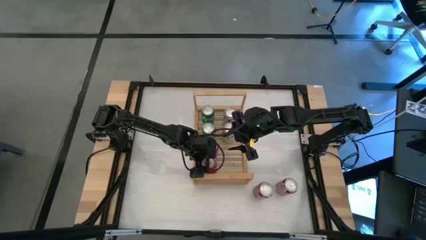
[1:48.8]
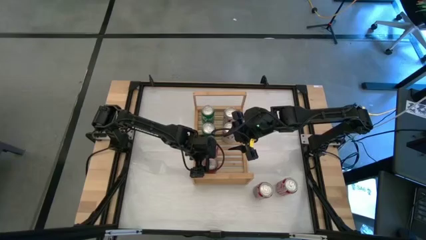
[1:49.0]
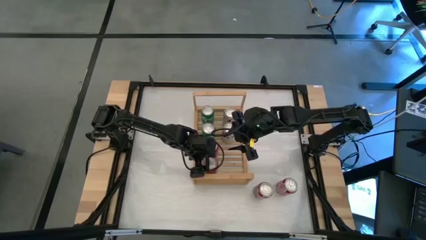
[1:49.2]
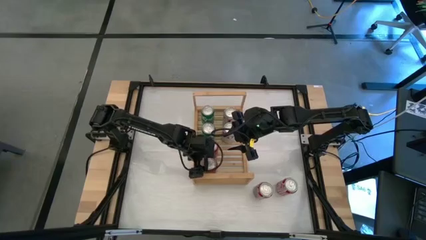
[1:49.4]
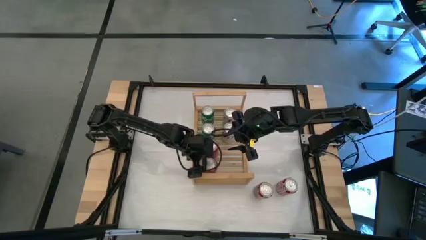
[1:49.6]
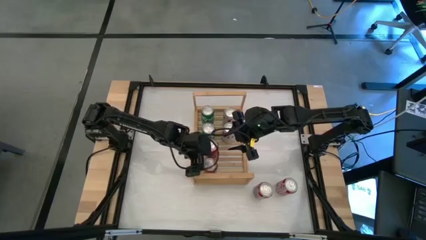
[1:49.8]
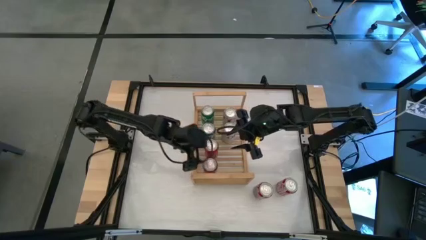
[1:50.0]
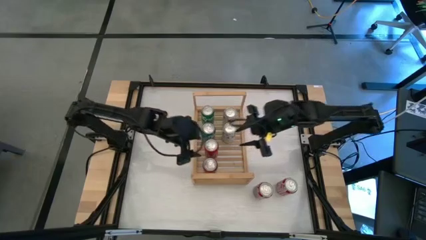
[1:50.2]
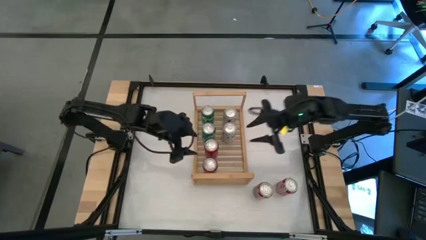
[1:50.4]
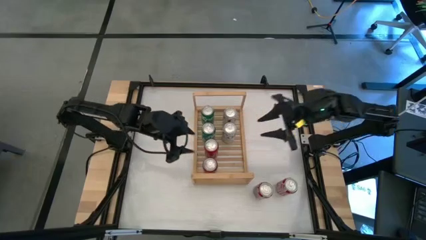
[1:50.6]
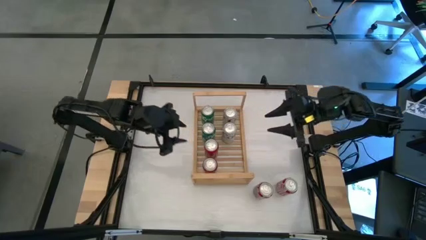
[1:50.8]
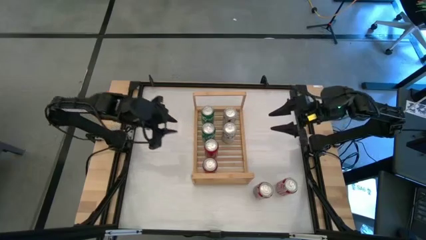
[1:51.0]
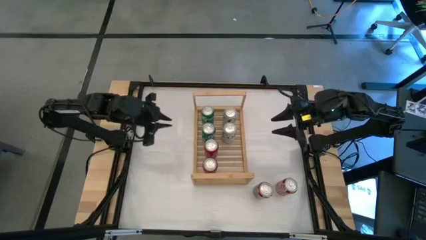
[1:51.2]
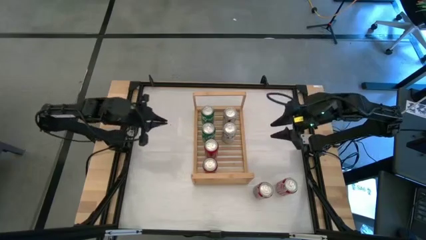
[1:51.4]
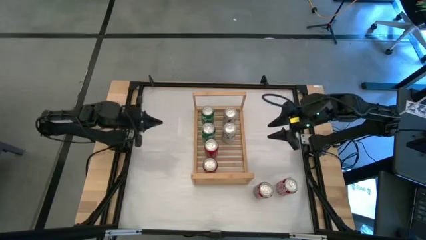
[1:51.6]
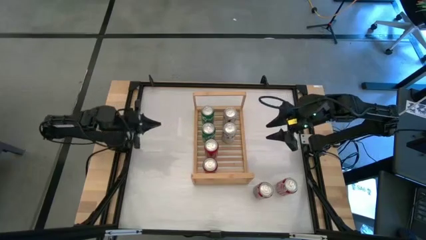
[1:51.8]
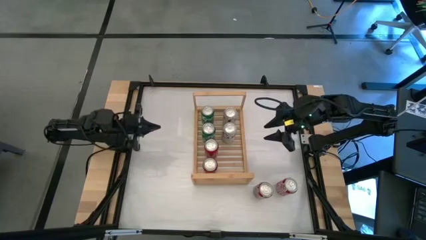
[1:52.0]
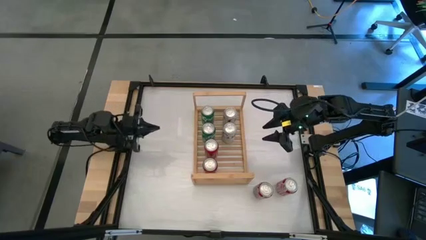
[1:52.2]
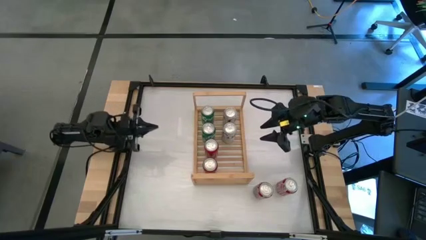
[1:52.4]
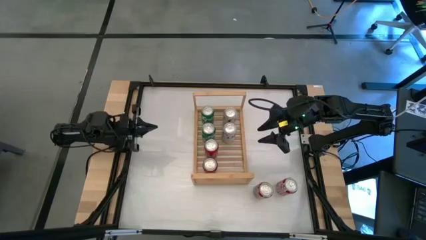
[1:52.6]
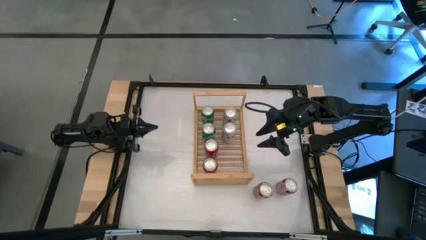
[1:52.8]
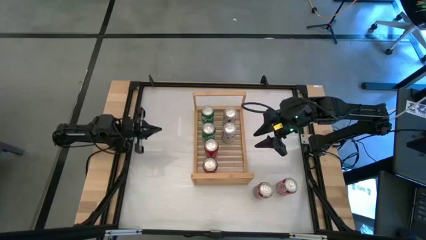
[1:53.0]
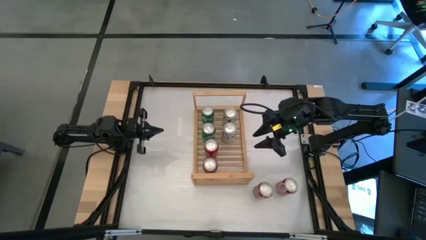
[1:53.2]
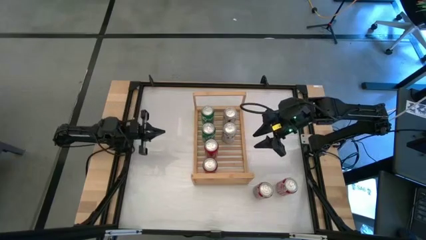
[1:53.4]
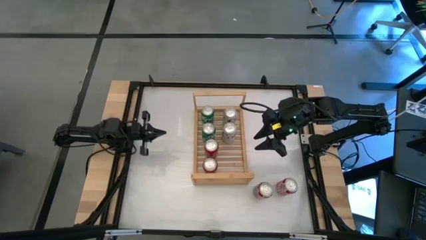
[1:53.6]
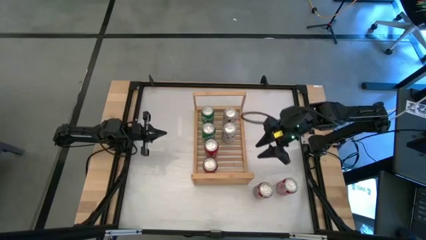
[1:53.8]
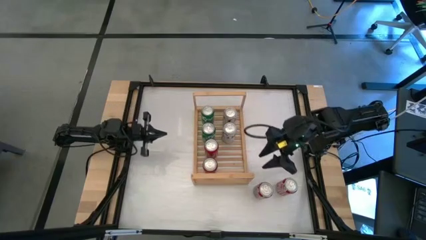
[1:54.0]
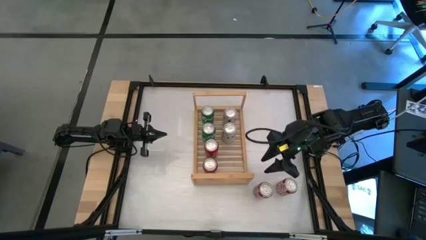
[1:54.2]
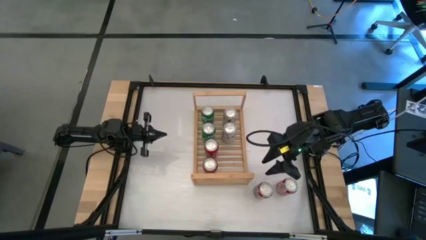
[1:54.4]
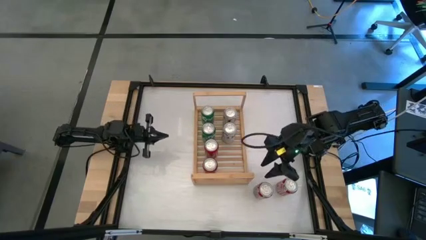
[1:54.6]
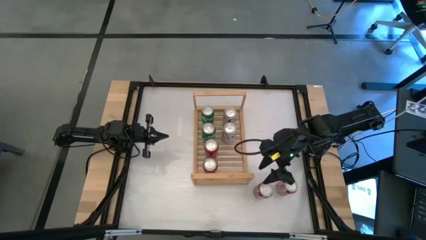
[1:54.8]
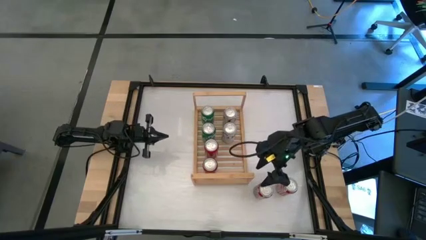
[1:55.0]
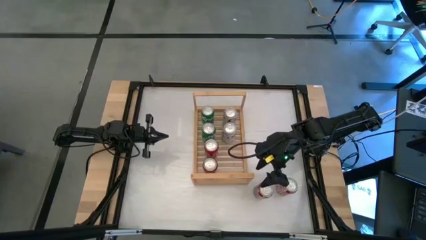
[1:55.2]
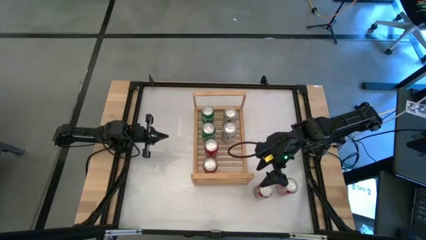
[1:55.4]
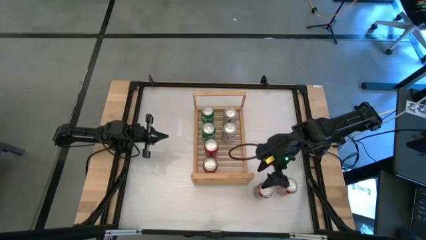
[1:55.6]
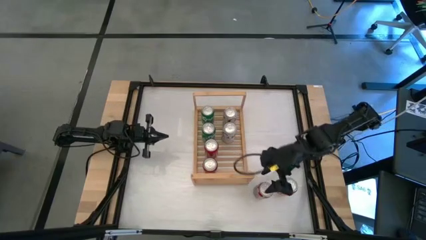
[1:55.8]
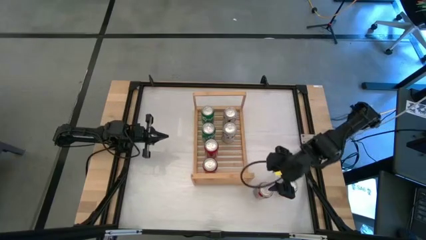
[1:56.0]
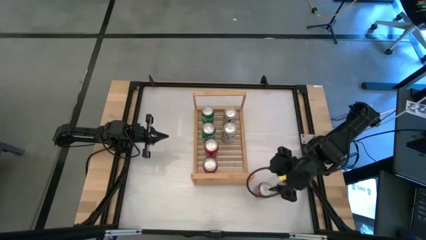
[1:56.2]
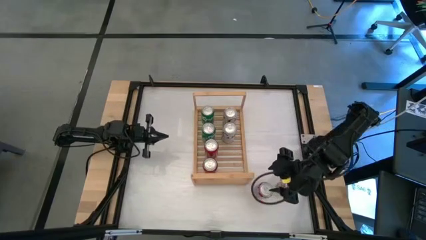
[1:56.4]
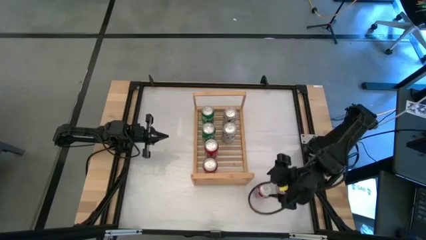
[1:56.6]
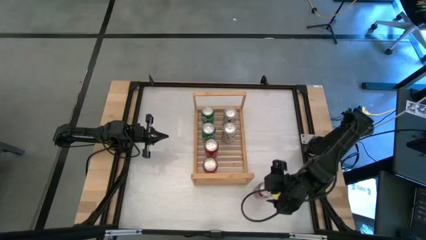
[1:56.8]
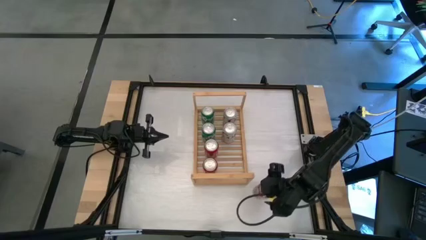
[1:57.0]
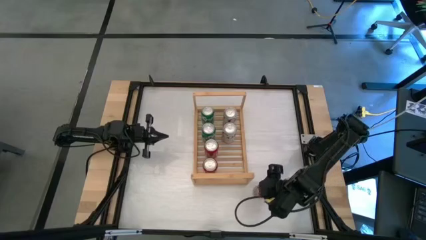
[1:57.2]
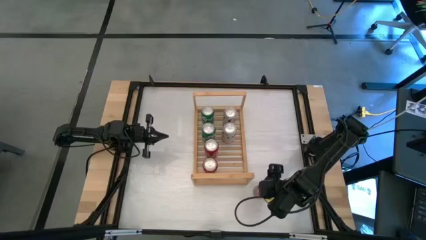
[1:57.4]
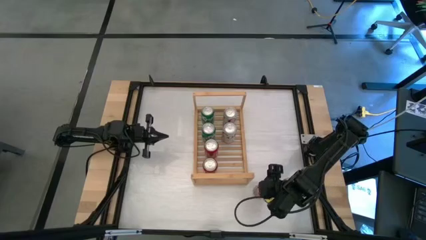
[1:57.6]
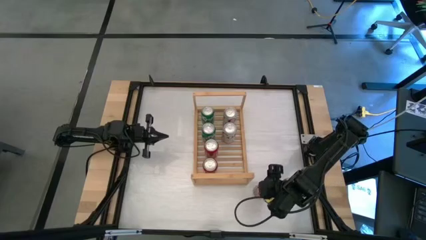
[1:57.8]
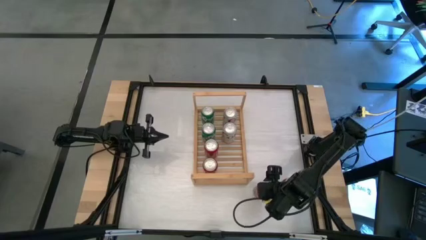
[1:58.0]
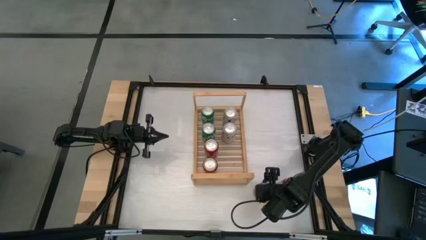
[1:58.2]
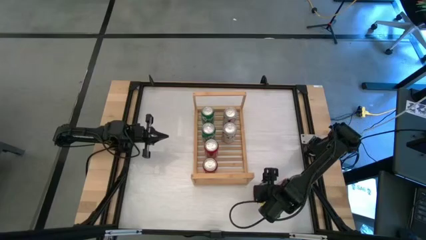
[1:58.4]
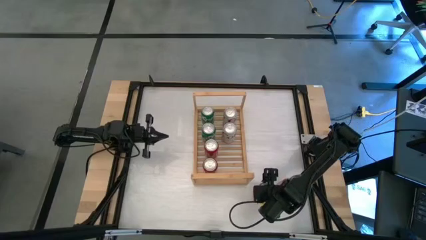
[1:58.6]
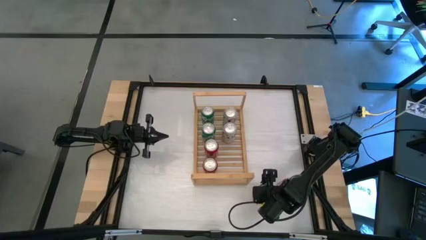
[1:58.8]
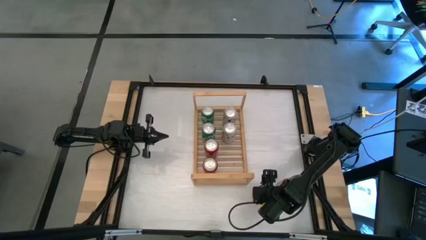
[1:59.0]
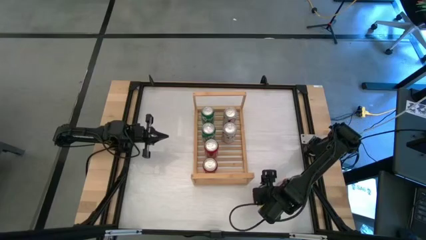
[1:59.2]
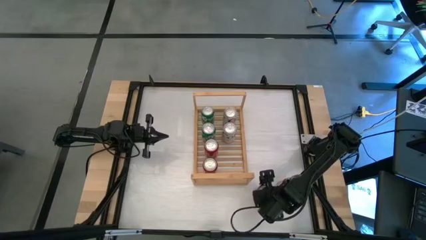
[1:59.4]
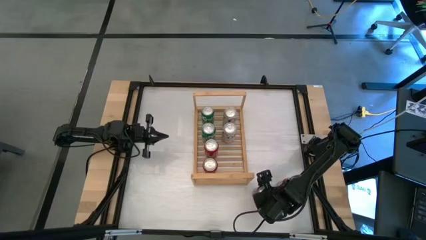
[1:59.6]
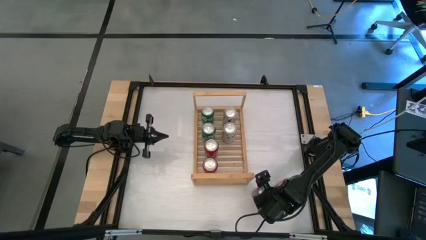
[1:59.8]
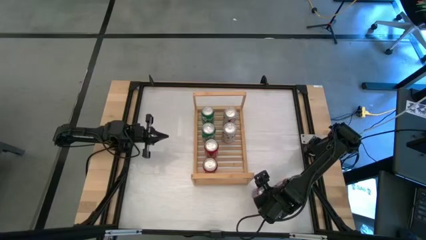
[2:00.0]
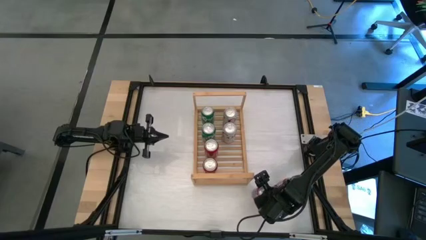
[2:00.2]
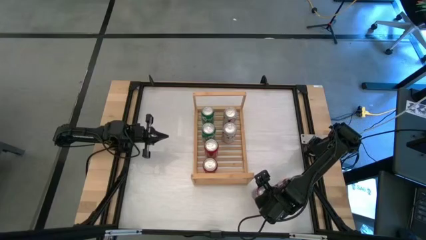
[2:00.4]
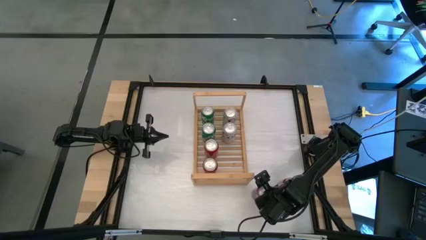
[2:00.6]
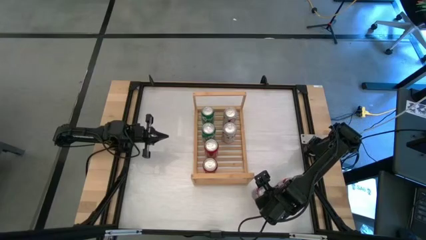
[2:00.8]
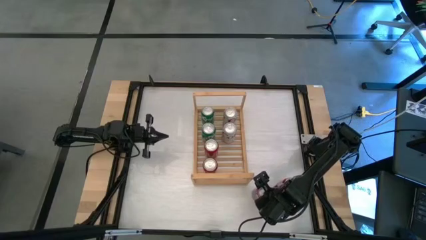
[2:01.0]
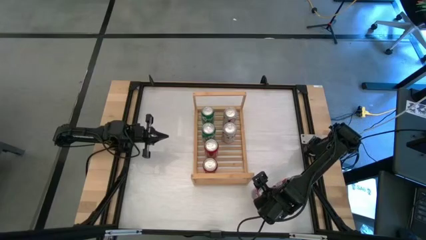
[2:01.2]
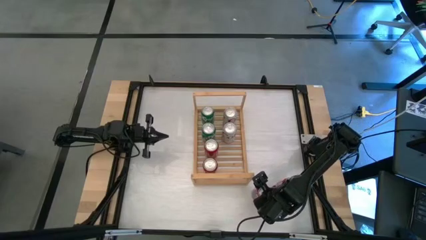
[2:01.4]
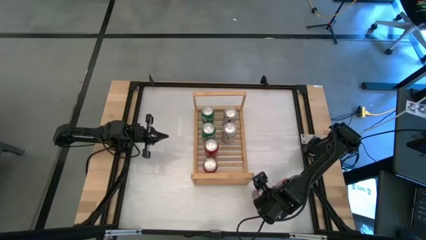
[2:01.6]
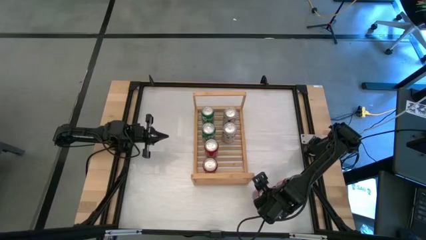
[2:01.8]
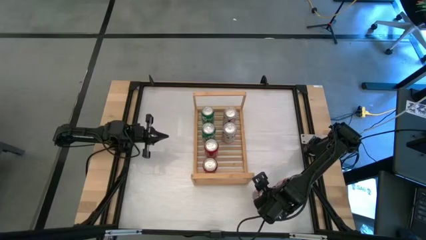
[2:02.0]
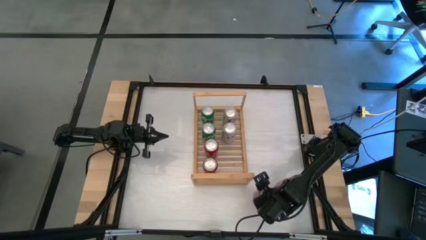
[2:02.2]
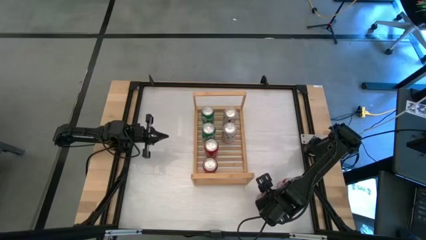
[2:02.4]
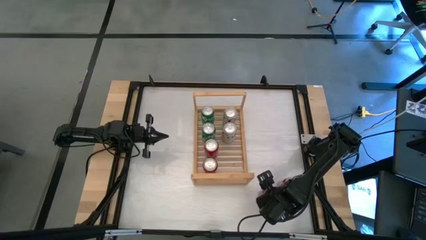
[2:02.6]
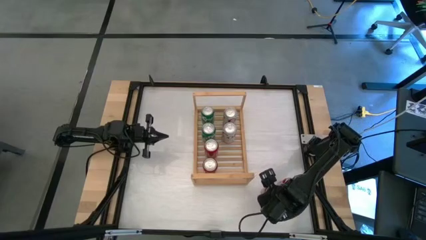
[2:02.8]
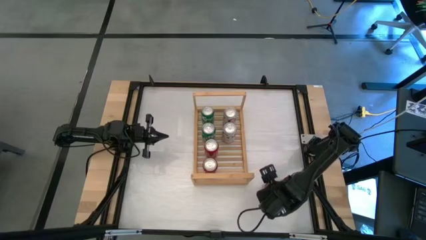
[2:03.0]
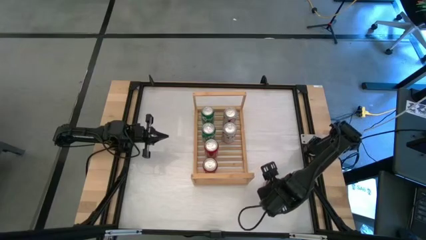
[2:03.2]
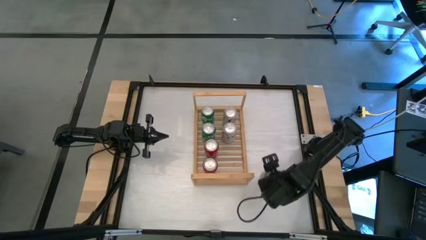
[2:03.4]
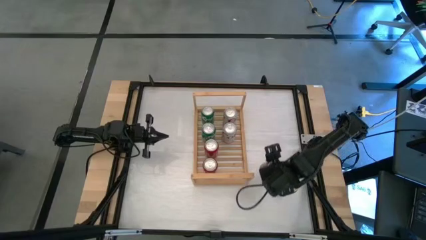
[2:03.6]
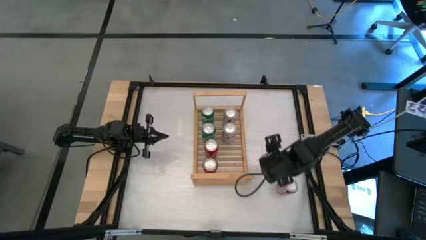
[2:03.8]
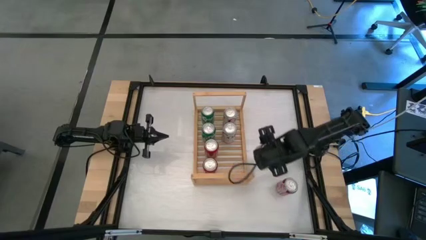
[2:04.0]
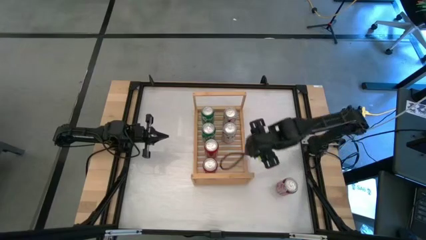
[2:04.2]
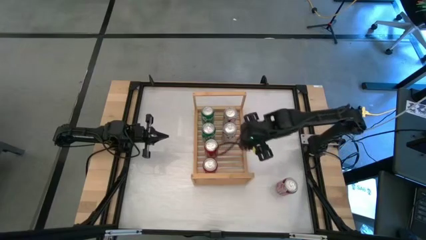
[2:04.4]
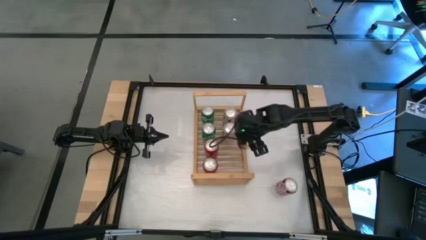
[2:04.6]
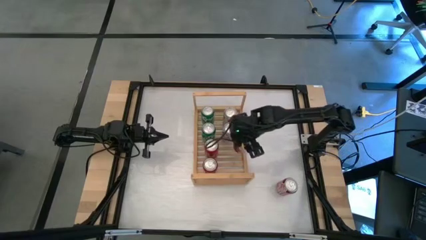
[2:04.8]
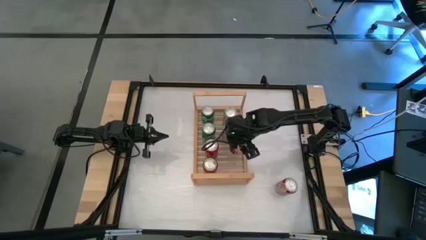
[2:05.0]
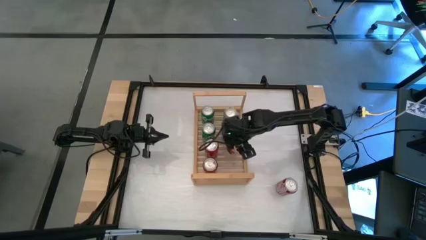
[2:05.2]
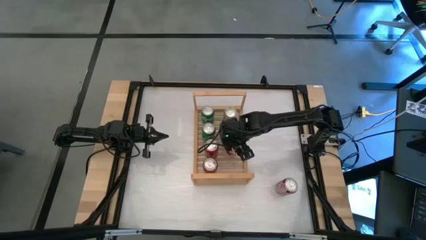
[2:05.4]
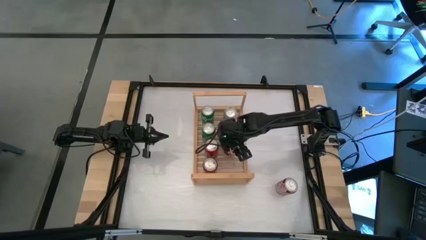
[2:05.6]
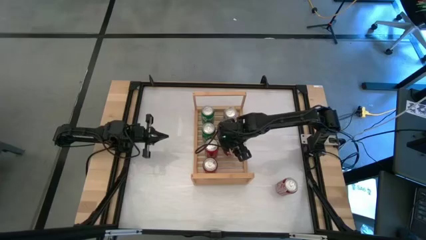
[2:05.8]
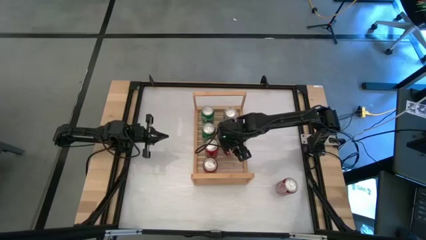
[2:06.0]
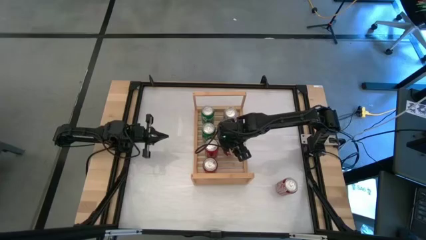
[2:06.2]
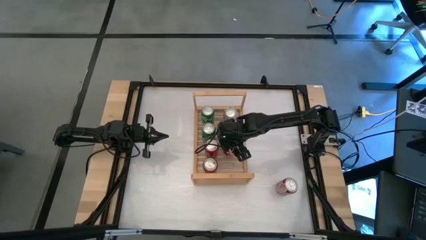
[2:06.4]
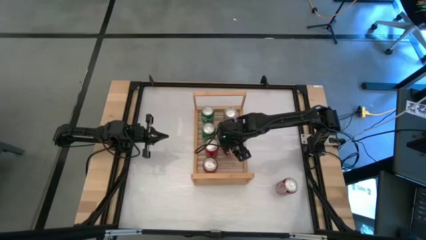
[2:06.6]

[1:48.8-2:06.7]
Task: Place canned beverage on shelf
Put the left red soda can on the shelf
